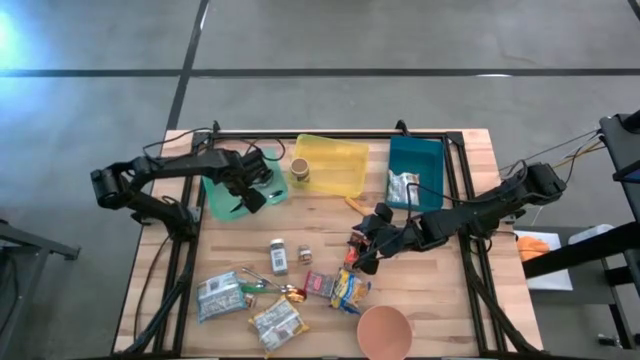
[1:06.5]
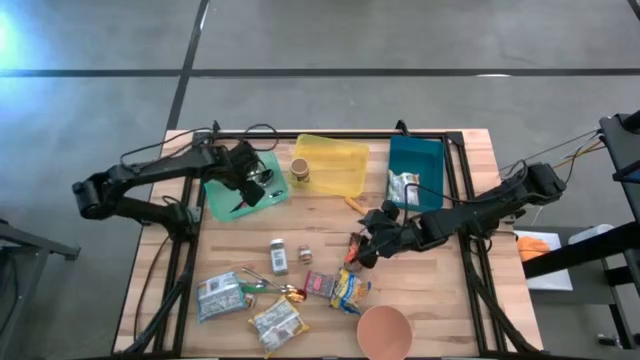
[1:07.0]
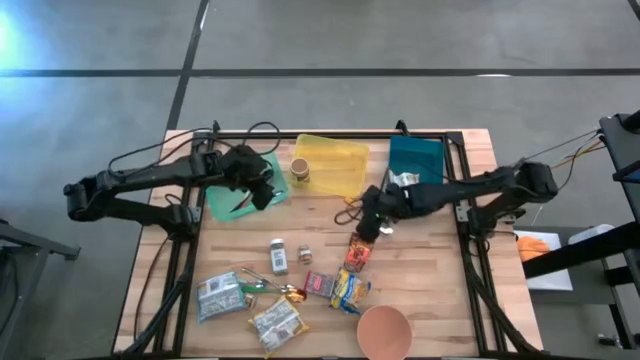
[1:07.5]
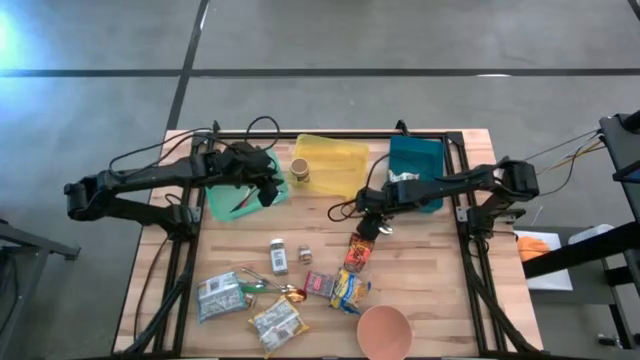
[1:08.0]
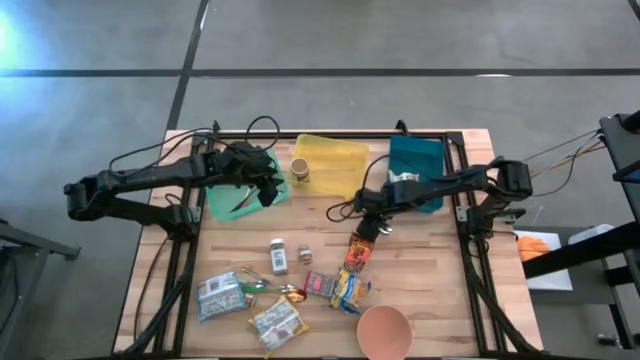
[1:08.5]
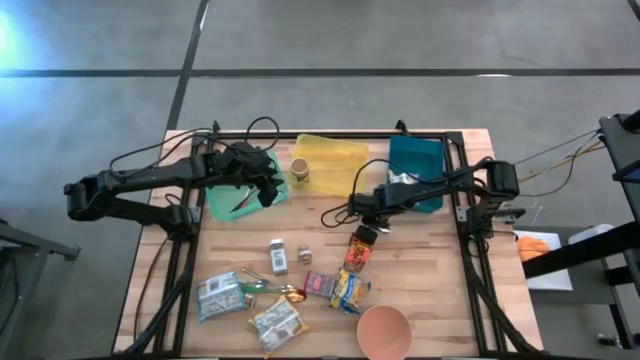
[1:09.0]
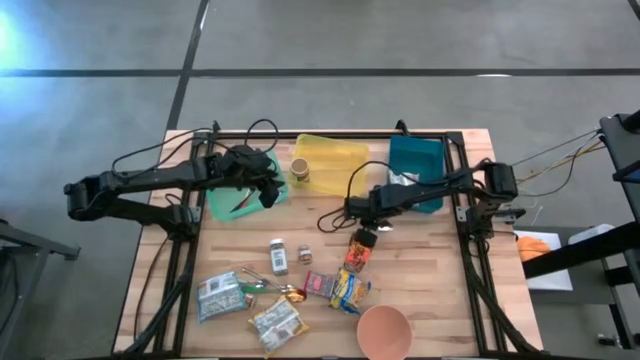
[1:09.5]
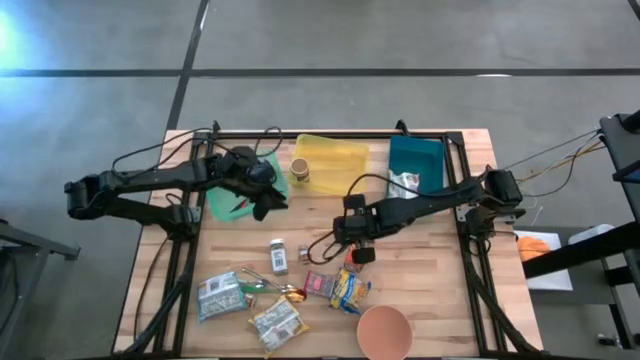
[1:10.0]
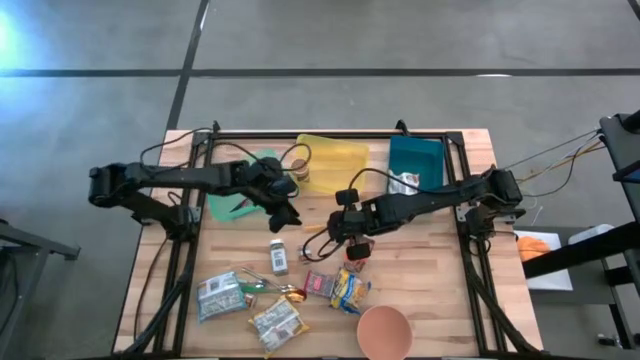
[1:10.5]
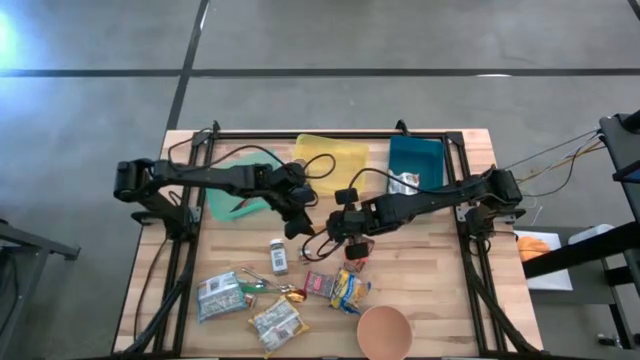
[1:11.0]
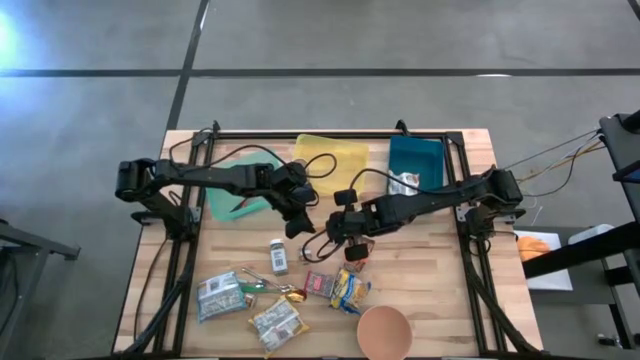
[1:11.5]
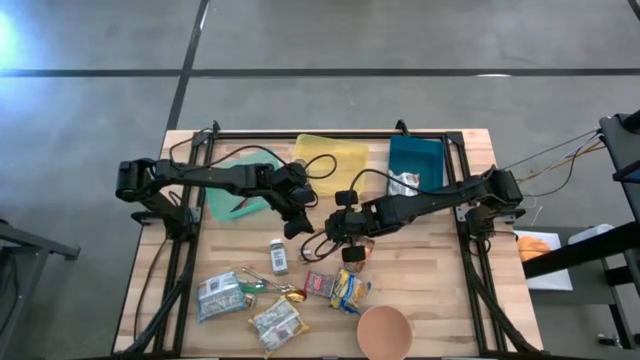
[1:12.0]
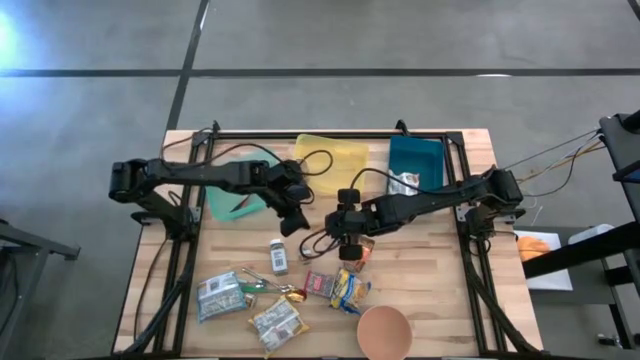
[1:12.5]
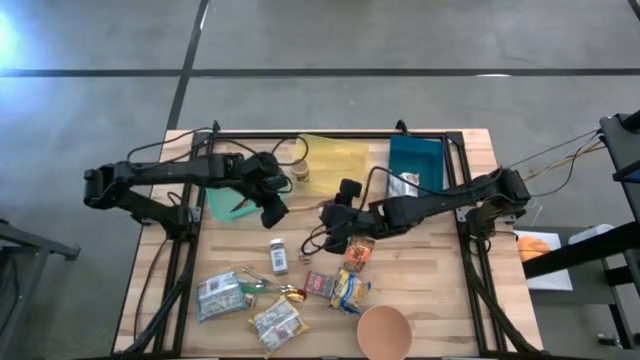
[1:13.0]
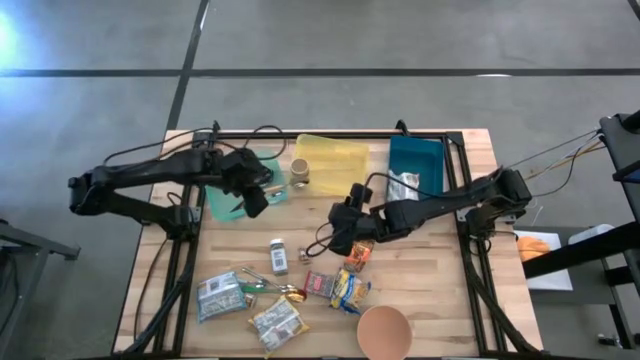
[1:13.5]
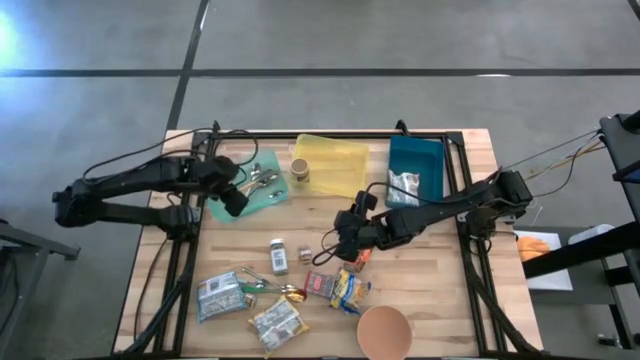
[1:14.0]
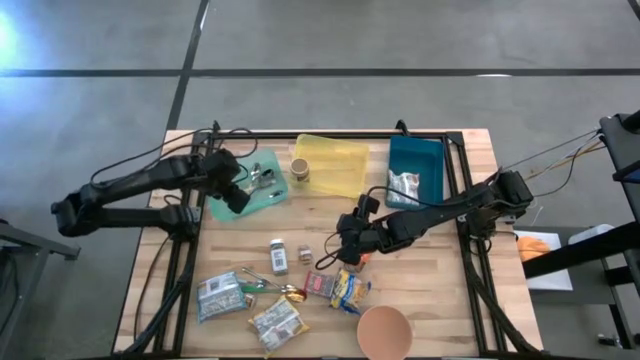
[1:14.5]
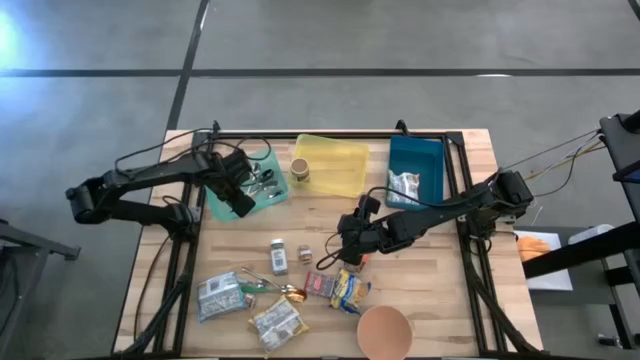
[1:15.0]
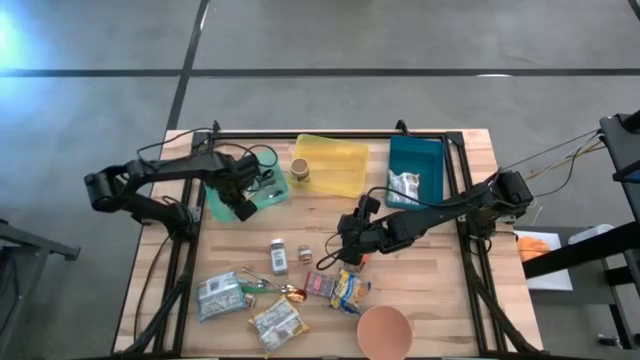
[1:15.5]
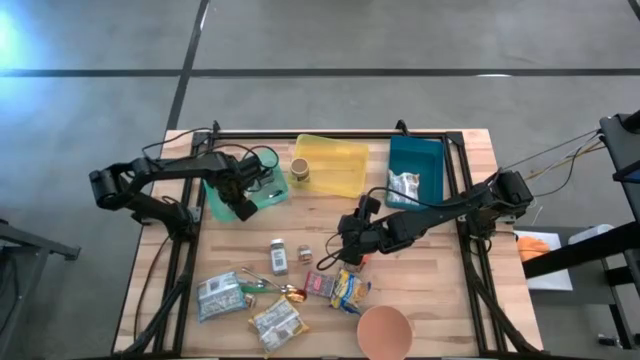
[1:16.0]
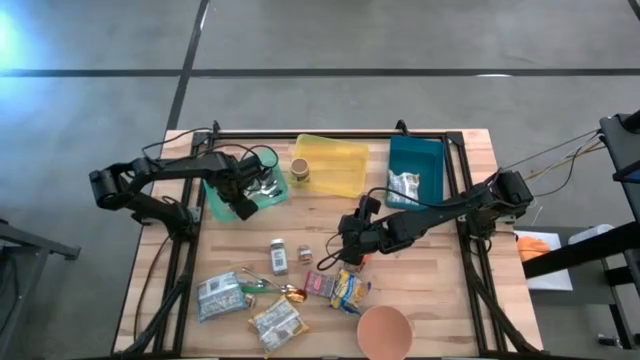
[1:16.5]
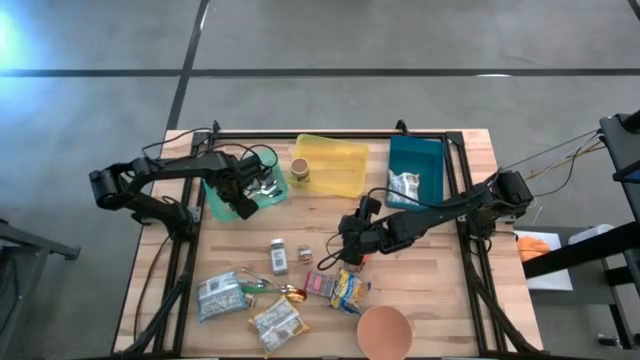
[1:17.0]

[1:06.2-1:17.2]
Put the yellow spoon into the green bin

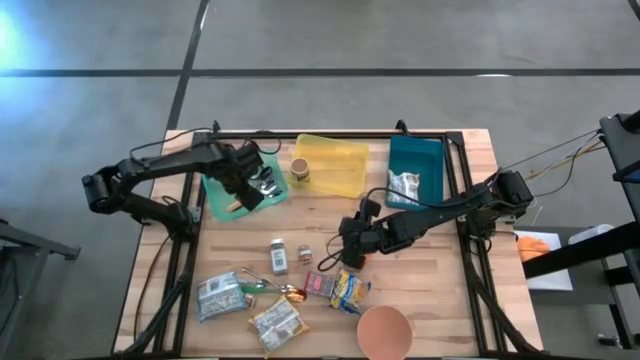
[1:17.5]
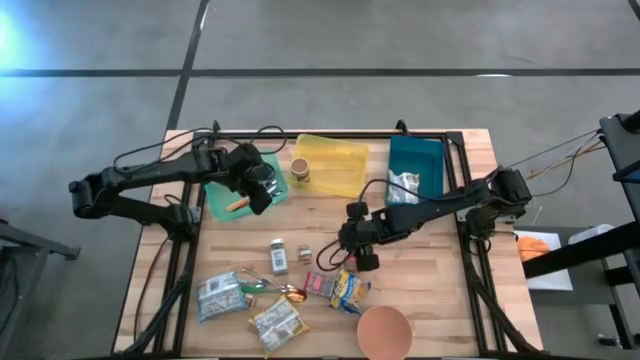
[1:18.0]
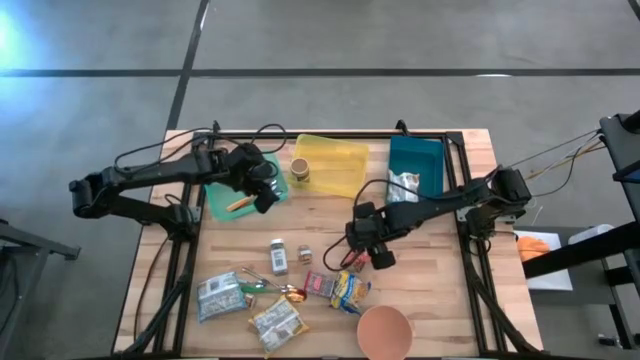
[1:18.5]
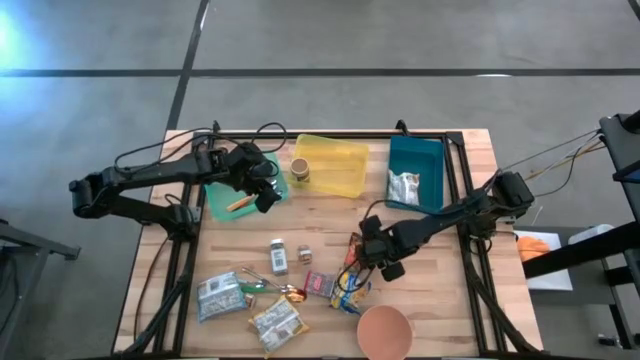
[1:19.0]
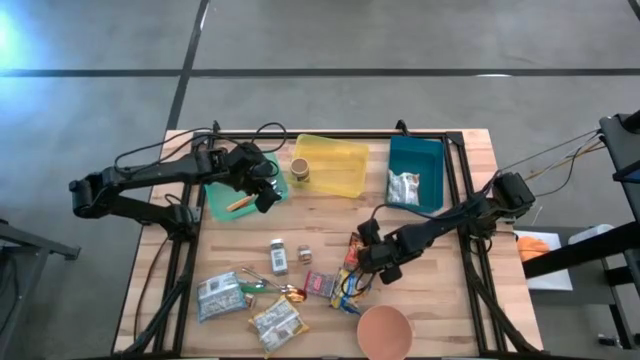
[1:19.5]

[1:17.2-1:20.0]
Put the orange seasoning pack into the yellow bin

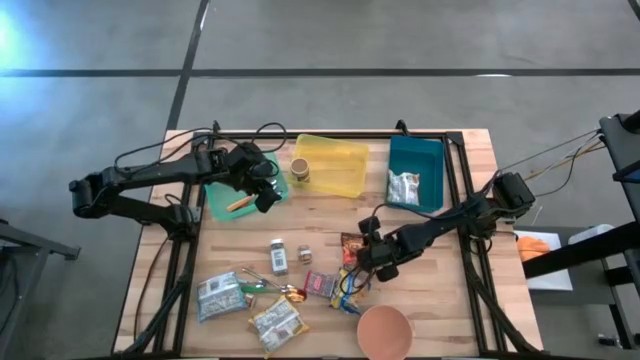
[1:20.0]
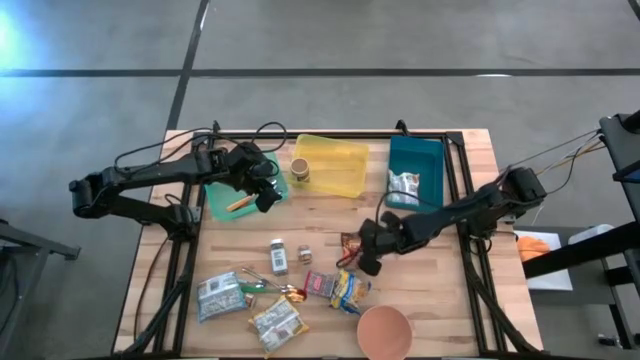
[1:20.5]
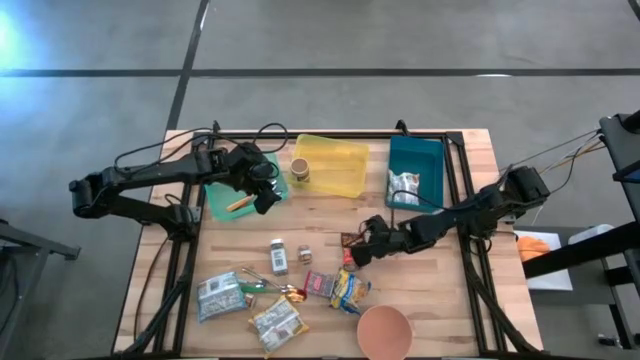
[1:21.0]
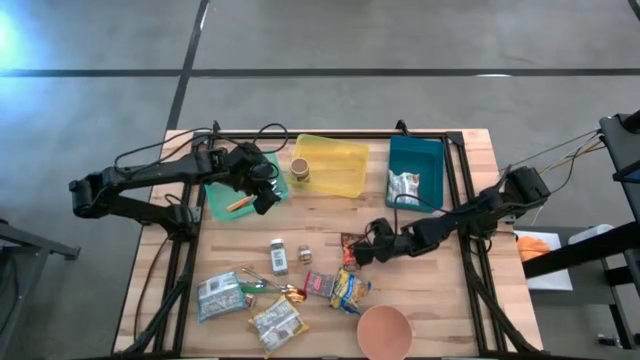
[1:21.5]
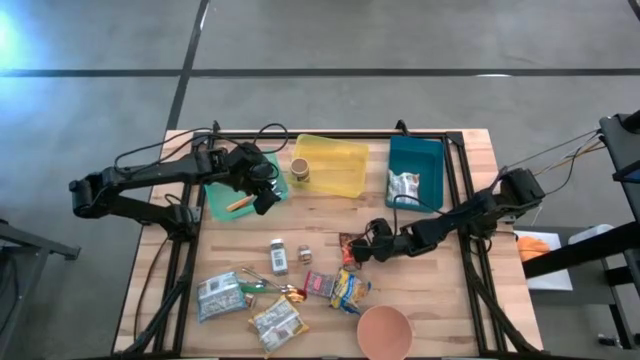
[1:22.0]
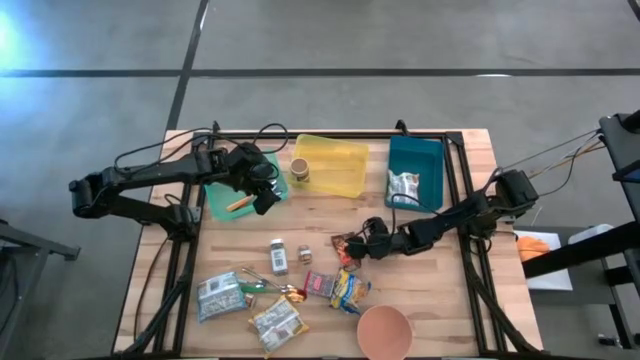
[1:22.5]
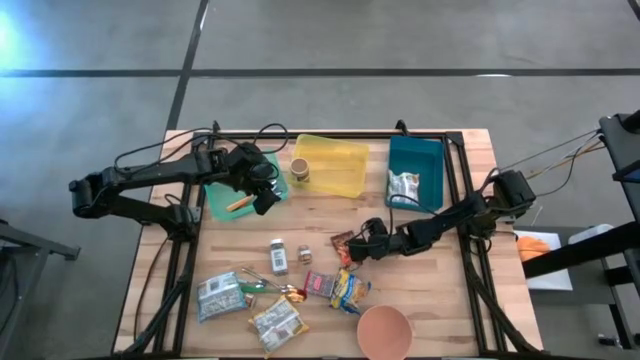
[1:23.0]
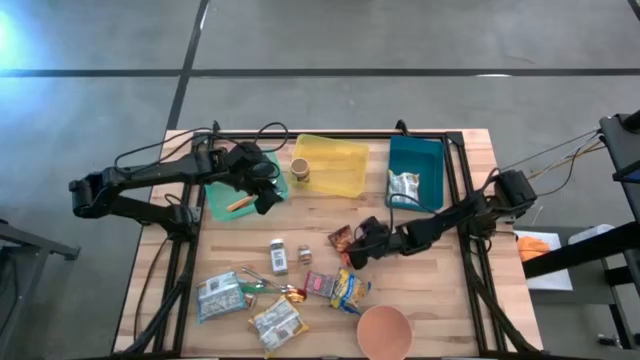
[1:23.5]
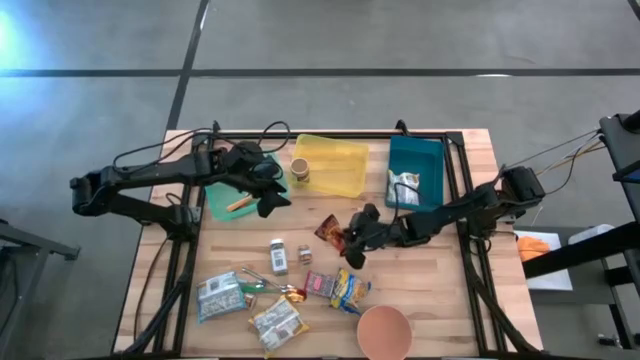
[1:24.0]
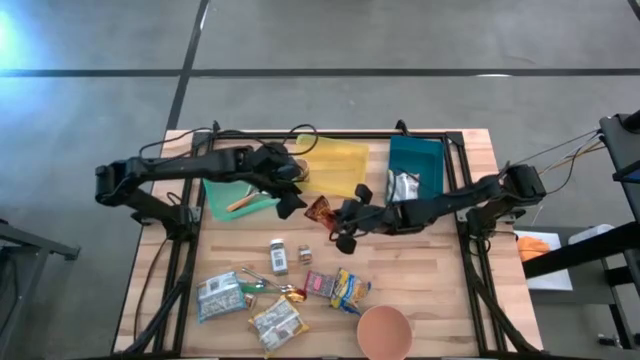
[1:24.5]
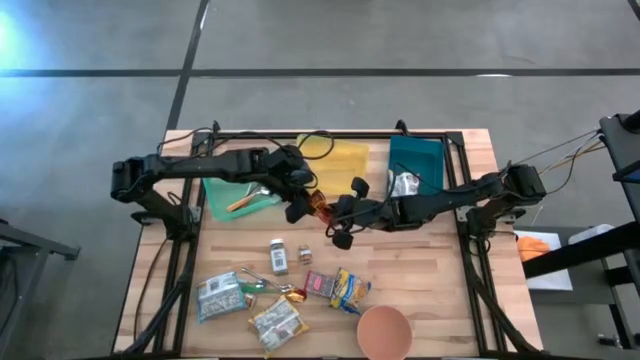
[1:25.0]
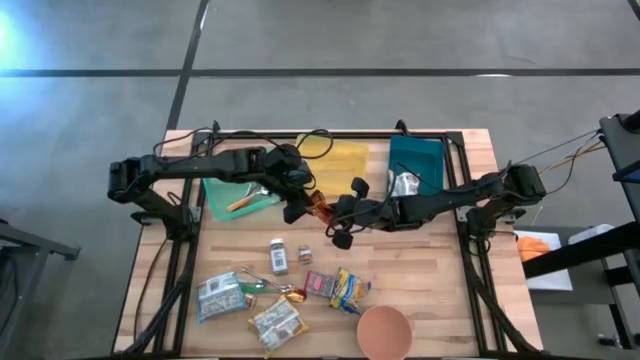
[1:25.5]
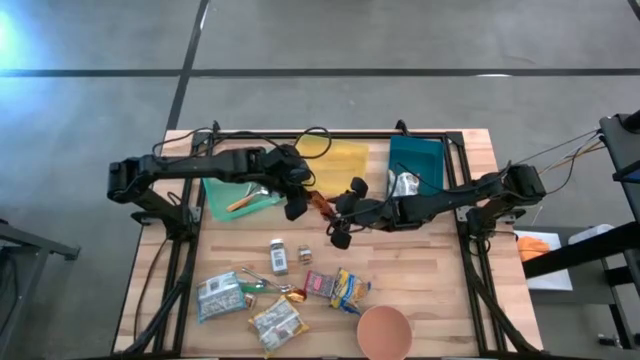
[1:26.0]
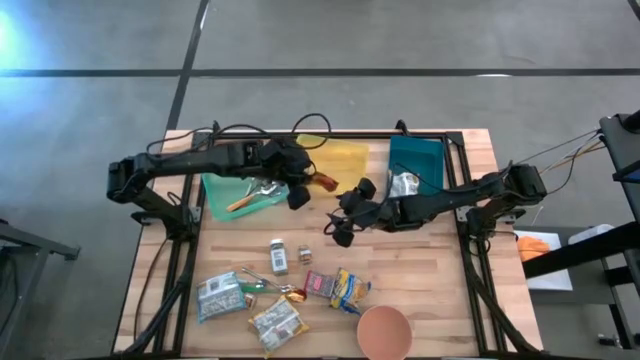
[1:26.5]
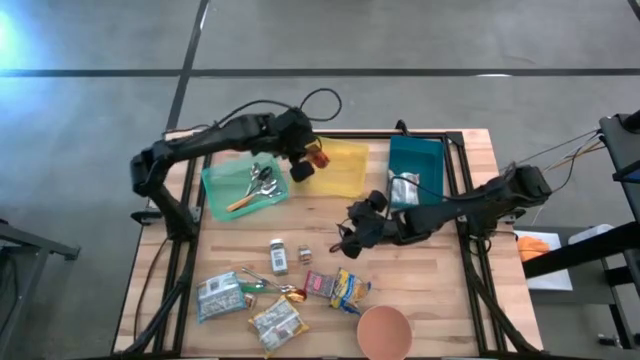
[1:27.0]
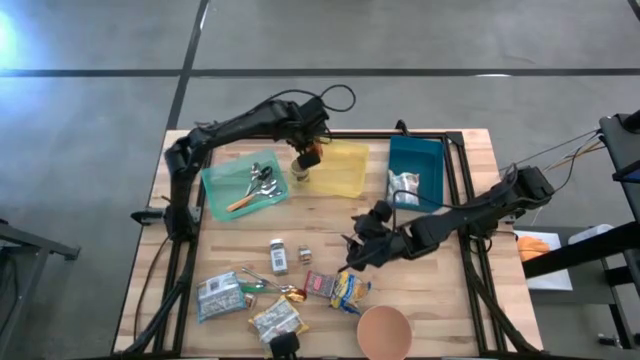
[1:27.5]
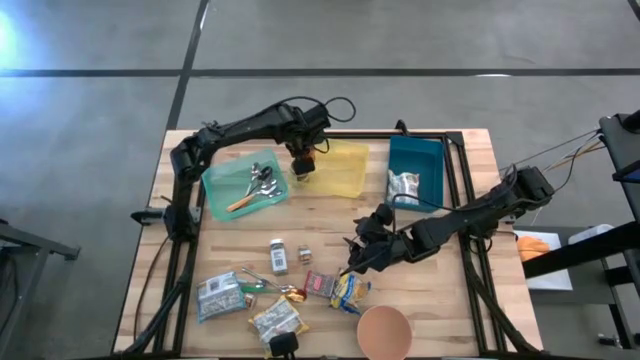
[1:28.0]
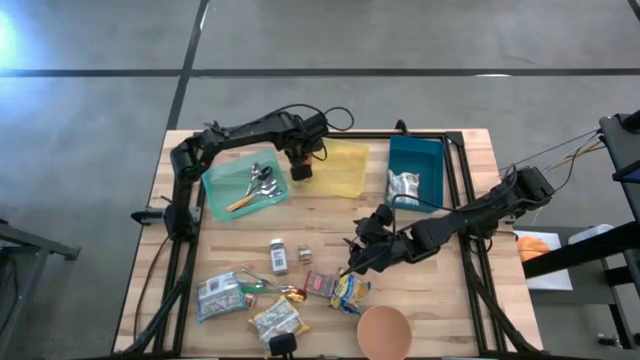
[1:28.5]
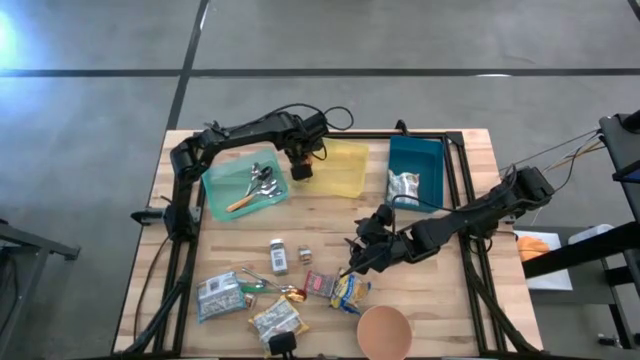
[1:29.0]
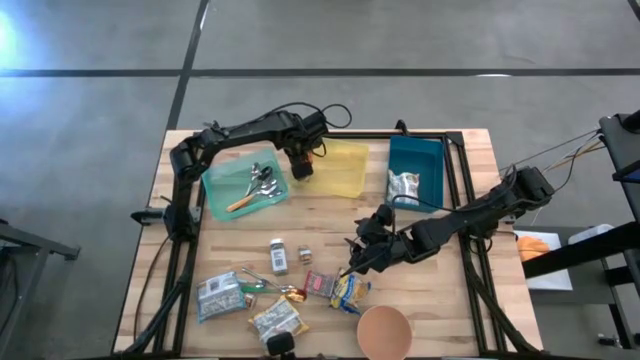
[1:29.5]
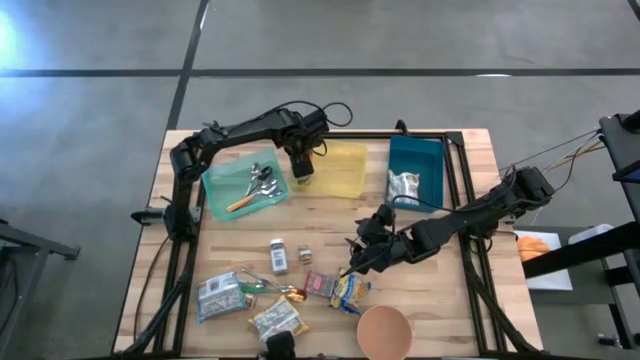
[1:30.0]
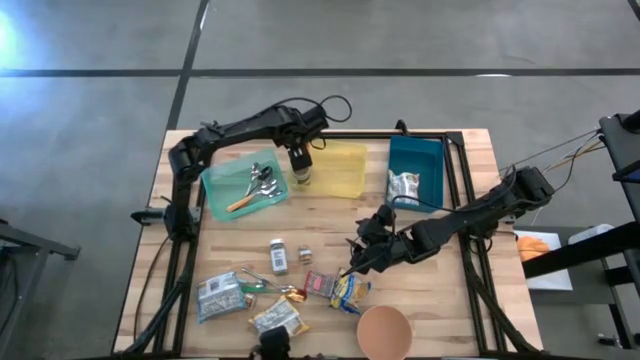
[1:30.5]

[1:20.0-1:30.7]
Put the orange seasoning pack into the yellow bin
